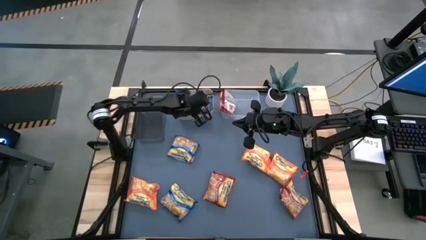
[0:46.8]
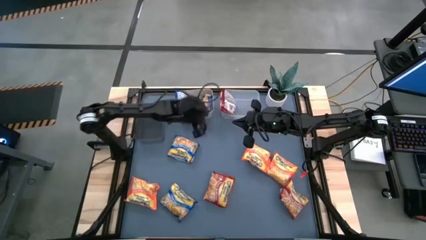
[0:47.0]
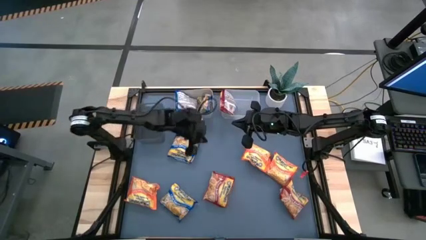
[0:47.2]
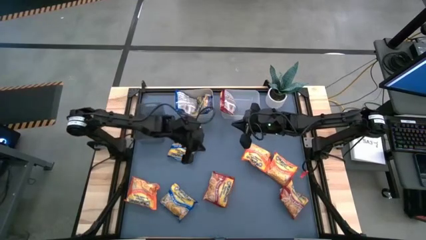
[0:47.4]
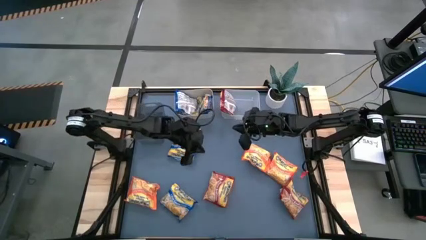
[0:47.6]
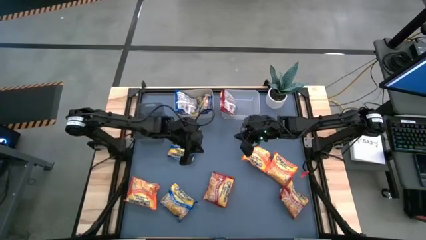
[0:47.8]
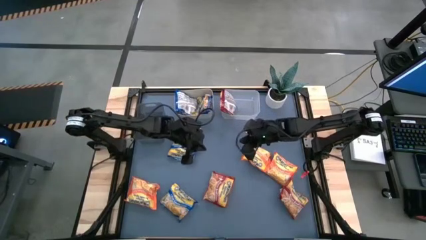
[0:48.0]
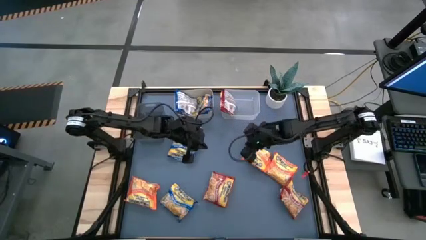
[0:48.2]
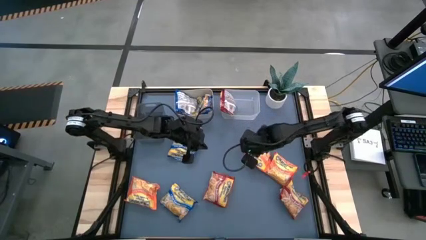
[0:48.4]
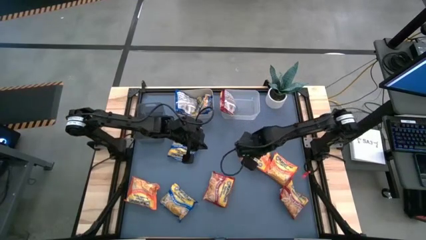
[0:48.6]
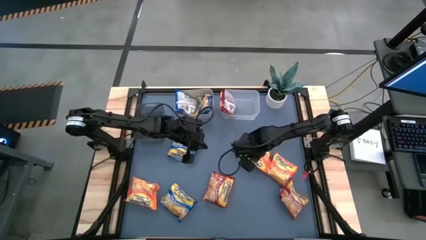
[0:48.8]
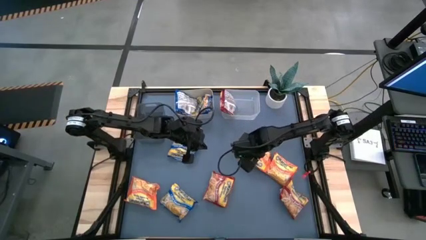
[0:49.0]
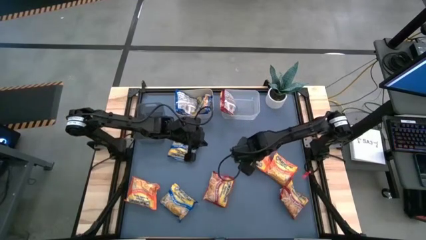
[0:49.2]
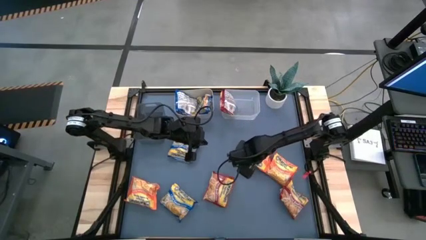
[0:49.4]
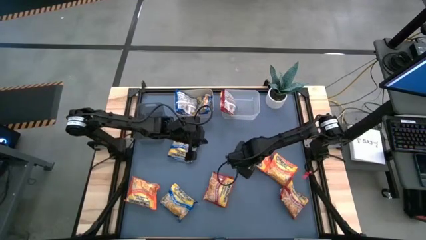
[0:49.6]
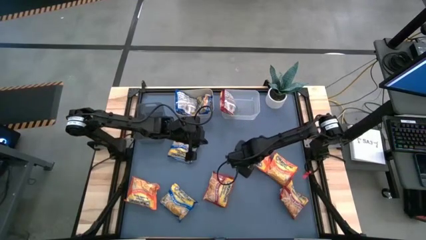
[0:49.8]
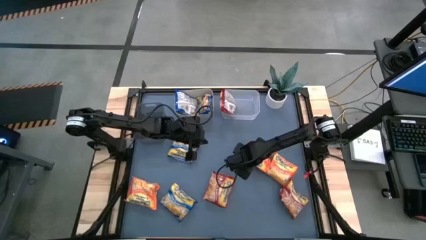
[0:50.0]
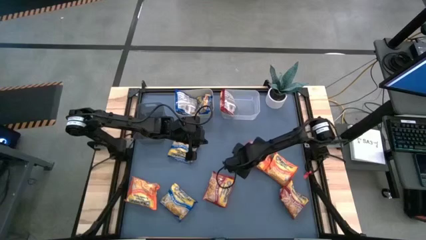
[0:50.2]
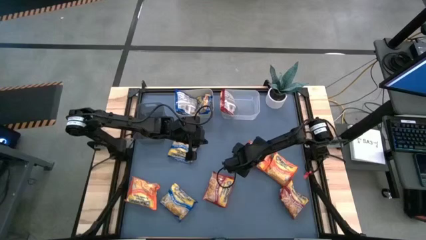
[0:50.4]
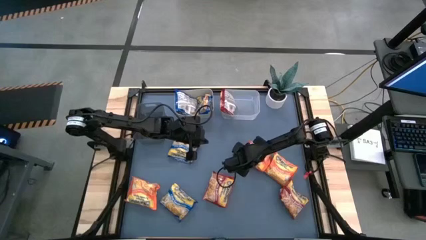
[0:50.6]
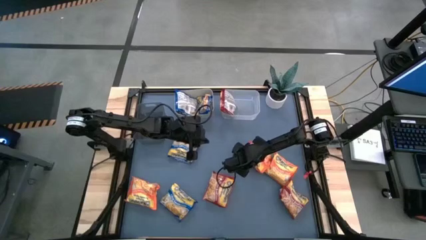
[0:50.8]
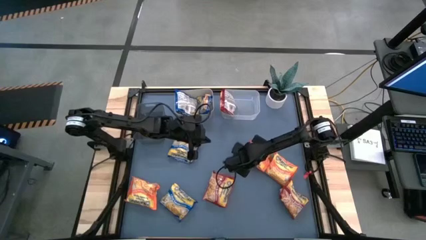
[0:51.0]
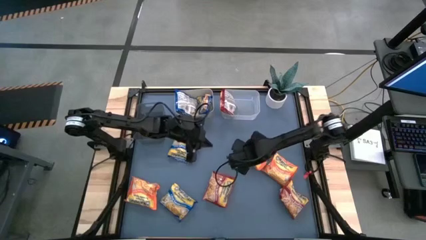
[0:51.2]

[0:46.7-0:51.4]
Task: Sort Maruchan noodles
Put the orange noodle pack into the black bin

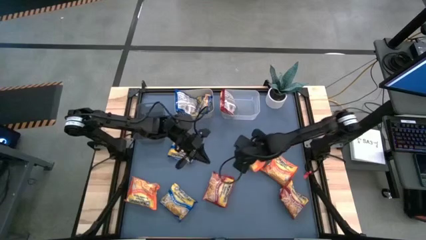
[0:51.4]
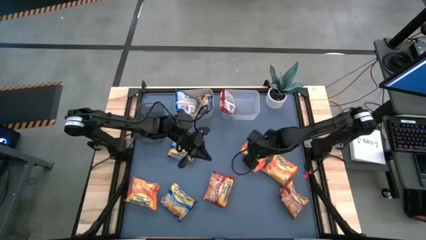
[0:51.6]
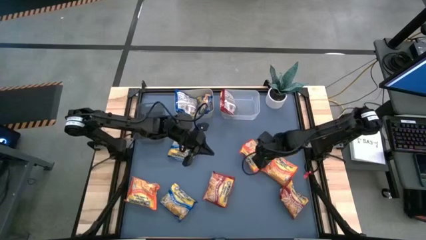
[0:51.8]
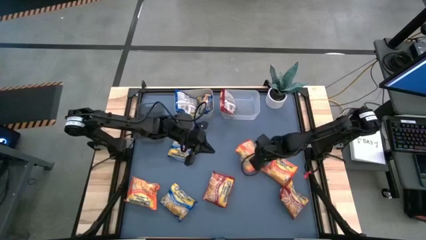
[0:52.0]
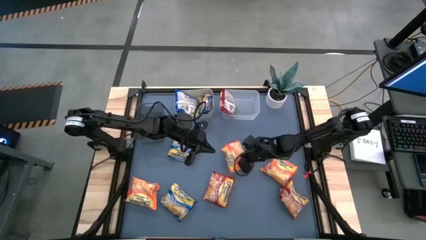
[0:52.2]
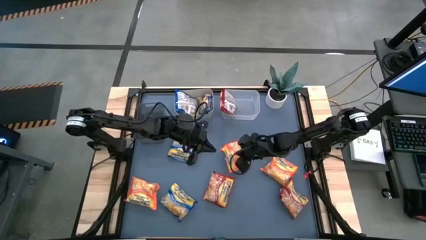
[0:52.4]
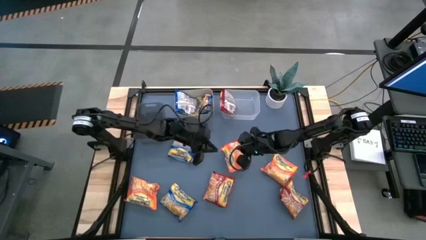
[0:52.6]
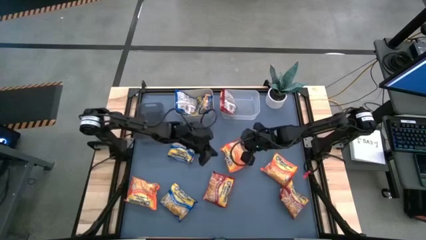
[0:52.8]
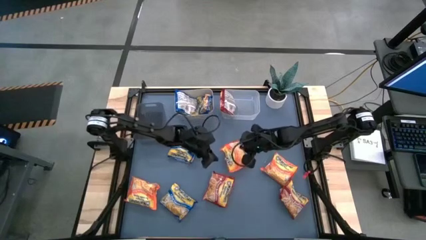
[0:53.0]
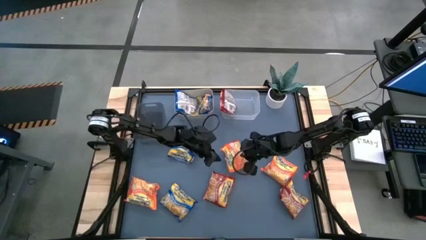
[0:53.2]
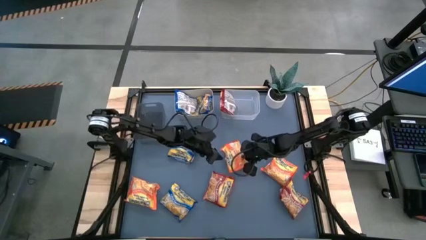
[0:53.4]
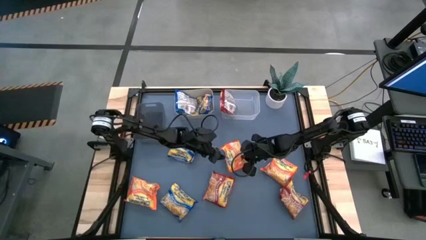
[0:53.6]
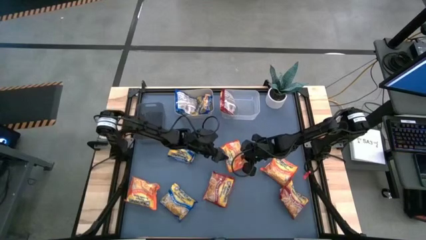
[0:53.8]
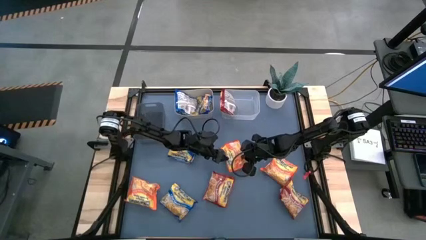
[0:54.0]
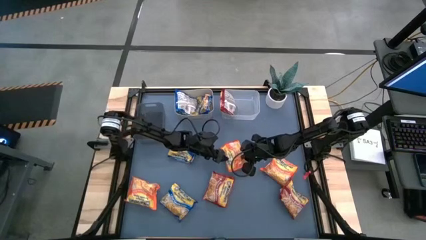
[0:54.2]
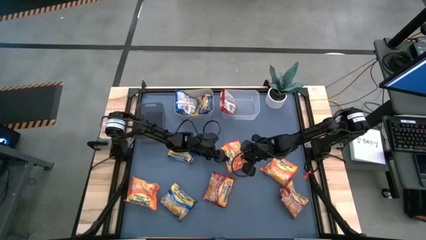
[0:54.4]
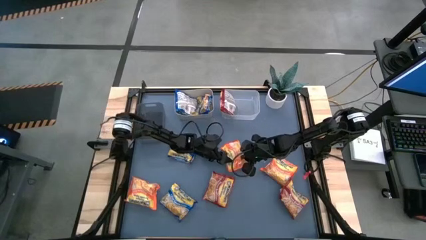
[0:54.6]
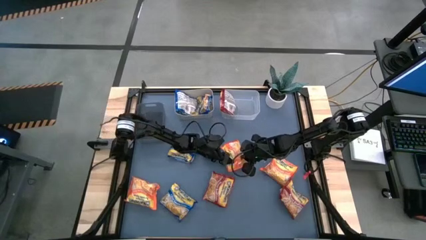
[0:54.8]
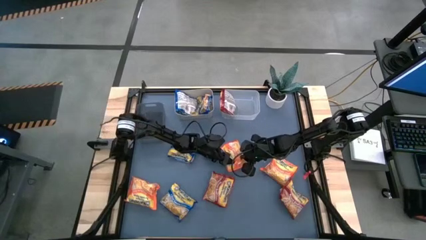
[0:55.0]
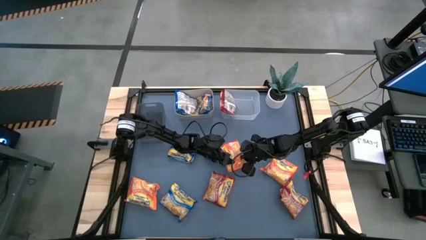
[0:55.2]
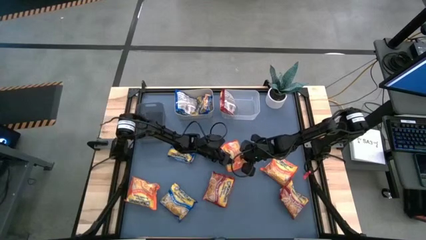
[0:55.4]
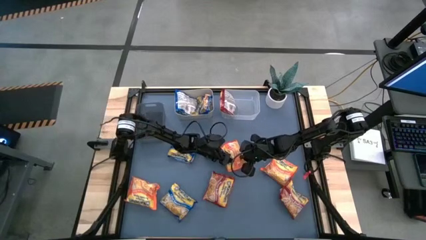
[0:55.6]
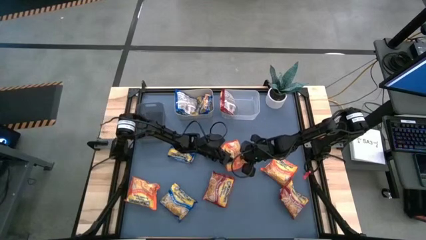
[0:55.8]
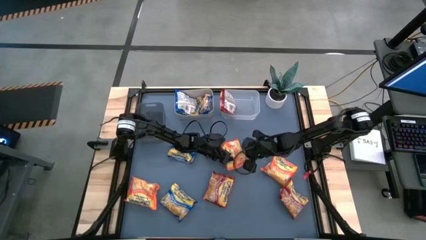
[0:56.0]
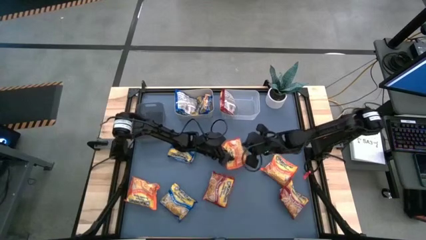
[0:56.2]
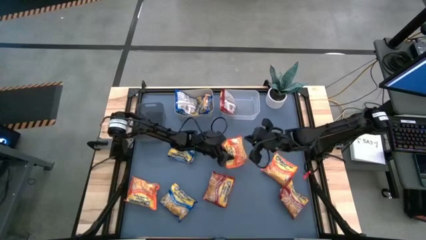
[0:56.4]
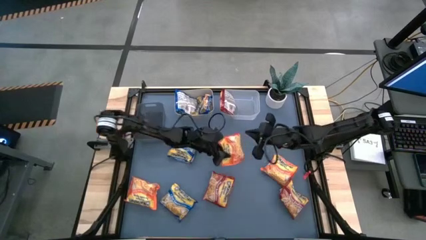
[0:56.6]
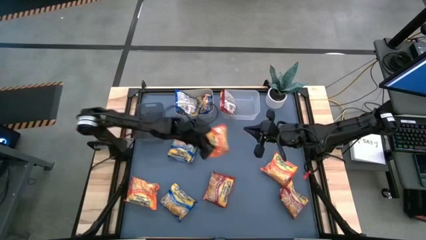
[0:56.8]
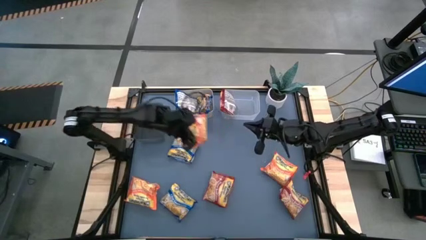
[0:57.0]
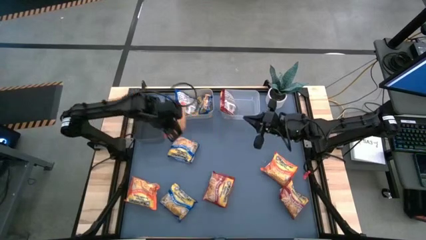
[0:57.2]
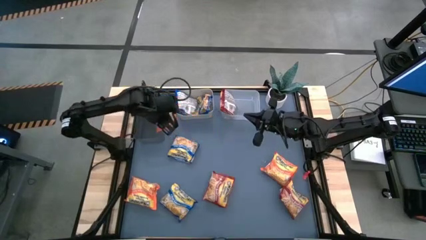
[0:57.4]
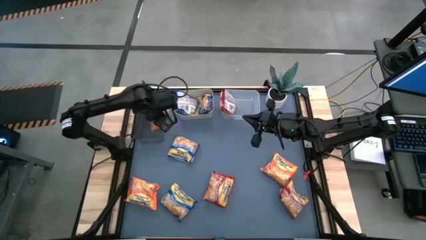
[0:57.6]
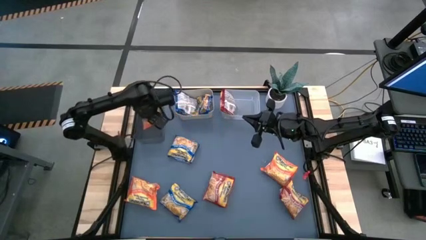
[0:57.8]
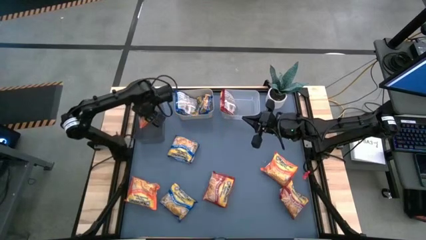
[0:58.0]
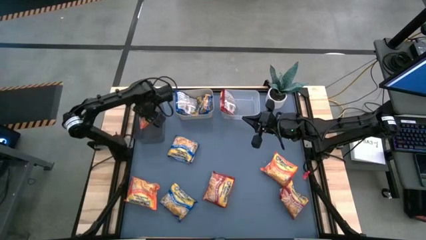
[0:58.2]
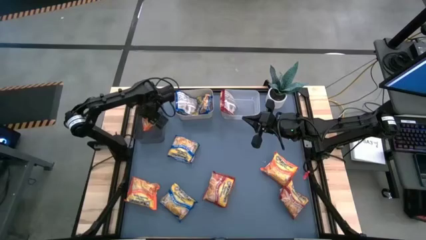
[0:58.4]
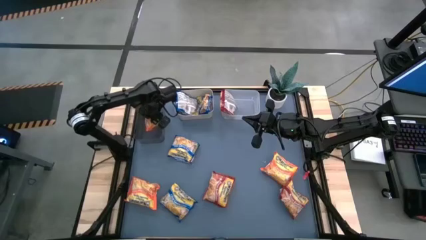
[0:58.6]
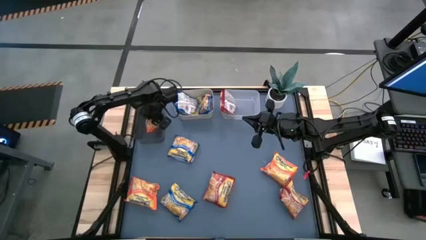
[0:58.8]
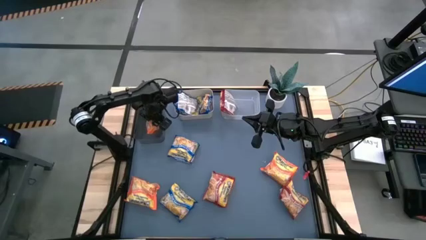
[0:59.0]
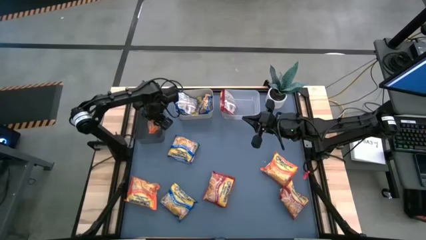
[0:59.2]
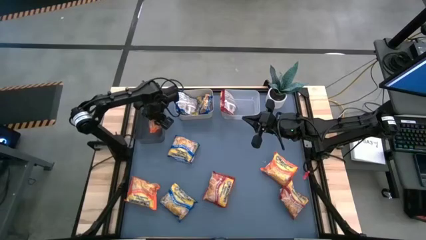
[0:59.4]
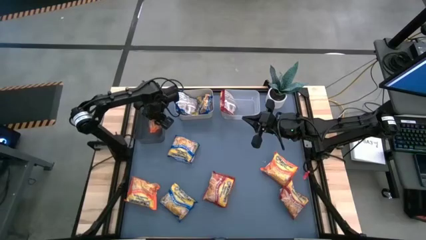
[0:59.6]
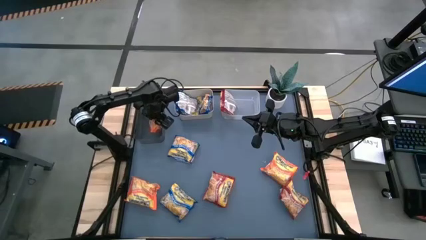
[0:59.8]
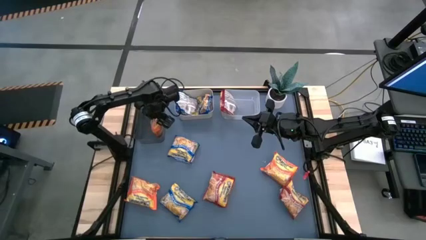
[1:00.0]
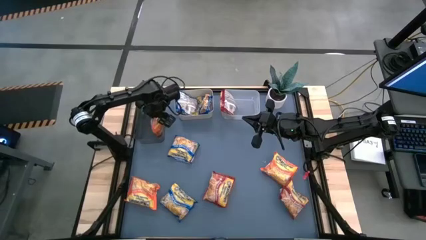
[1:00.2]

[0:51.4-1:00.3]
Put the orange noodle pack into the black bin

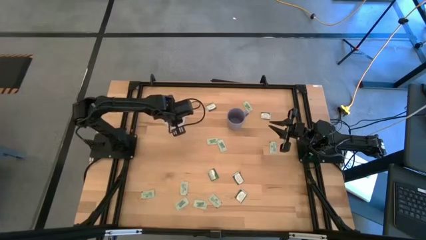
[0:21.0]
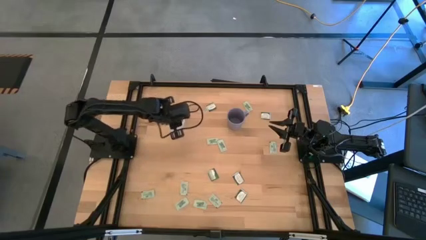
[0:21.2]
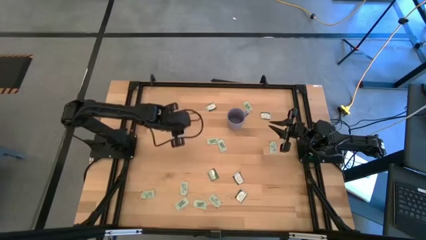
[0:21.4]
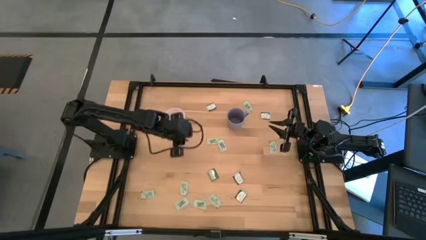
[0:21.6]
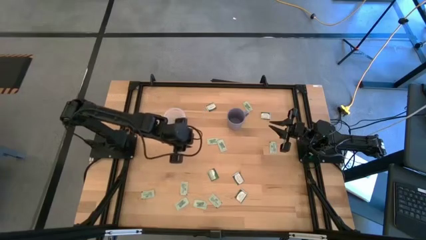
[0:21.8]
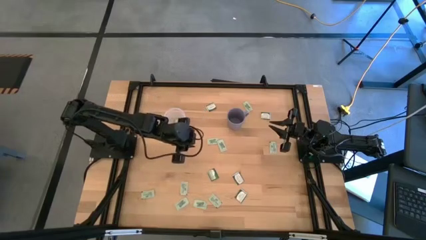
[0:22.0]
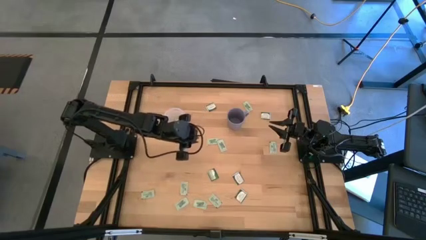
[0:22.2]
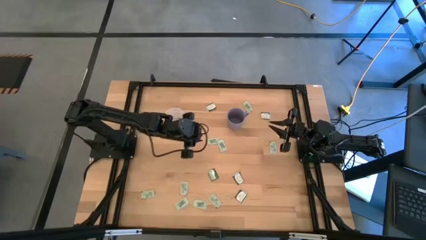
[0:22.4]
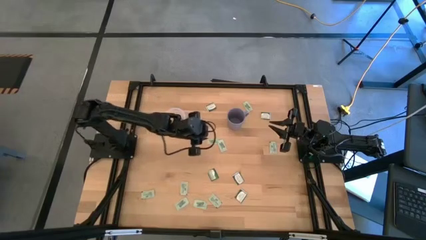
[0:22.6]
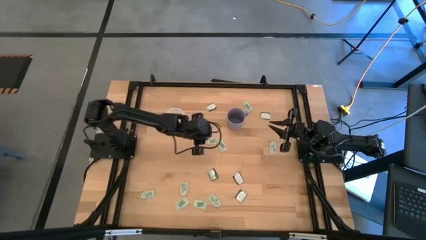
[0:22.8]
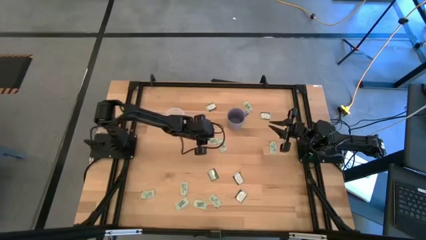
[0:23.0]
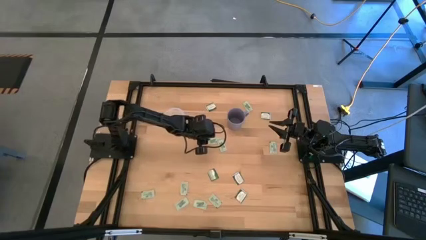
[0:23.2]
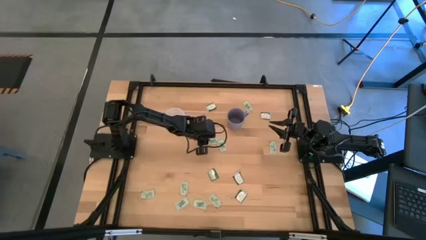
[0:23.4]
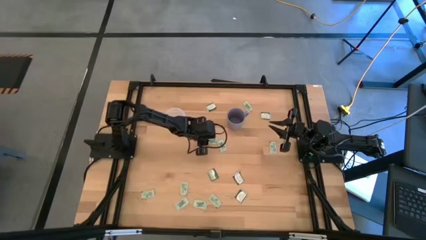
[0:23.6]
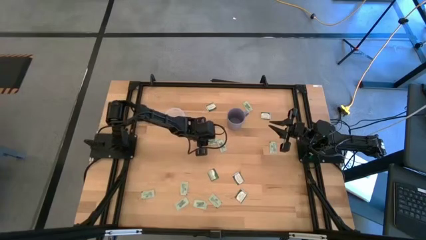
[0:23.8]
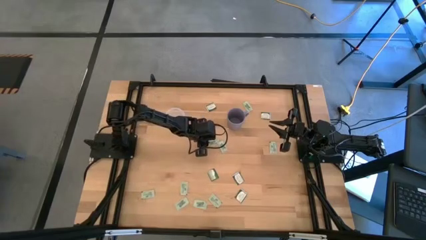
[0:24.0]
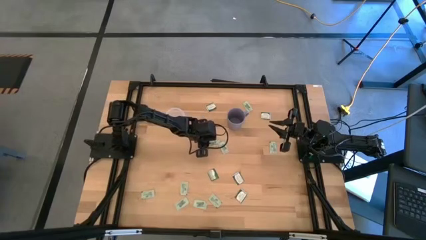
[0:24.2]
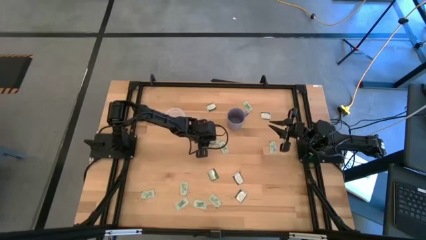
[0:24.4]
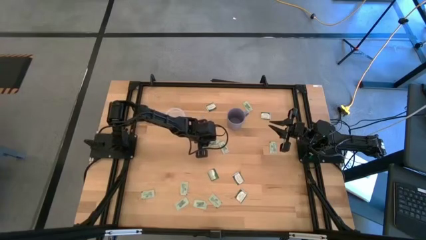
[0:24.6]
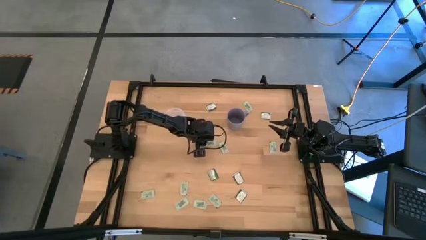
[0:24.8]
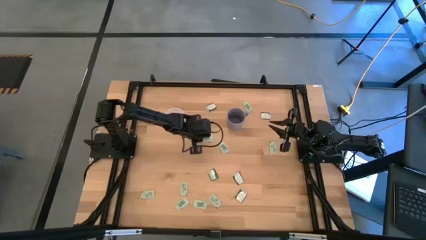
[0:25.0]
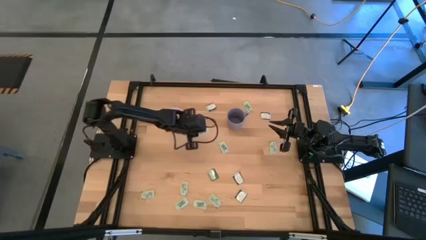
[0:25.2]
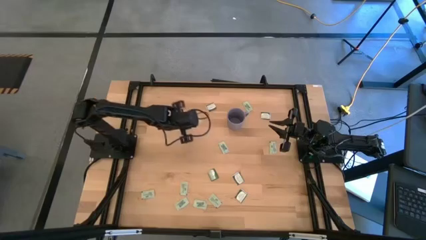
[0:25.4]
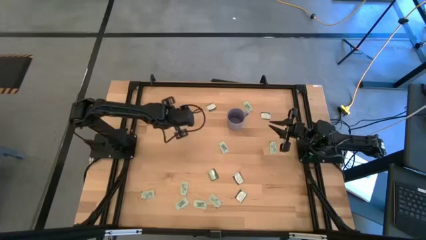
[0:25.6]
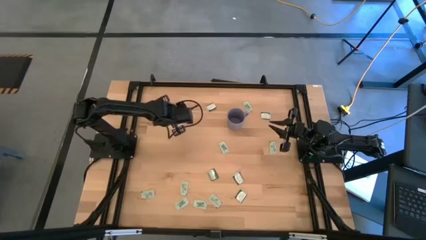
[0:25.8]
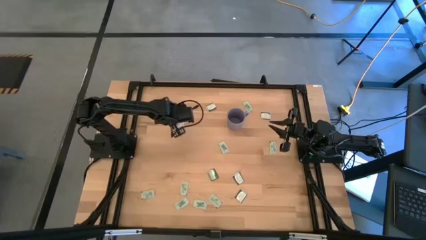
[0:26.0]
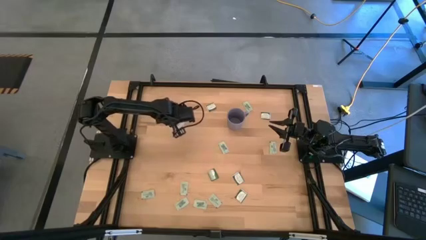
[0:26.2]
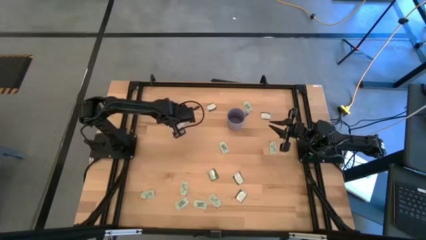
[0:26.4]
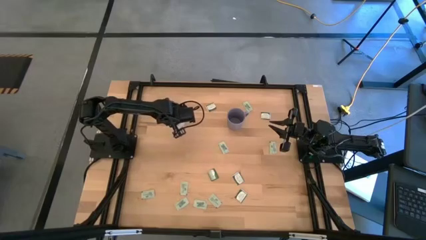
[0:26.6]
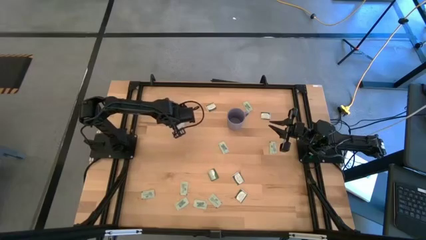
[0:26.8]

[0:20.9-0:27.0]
Task: Pick and place Stevia / Truvia into bins
Put the light green stevia packet into the transparent container
